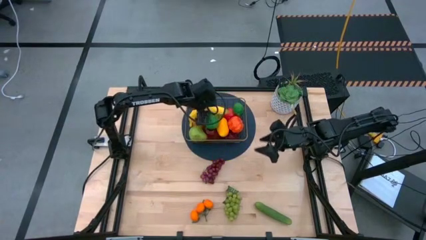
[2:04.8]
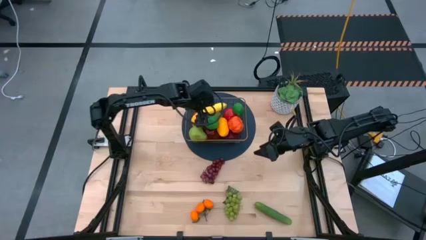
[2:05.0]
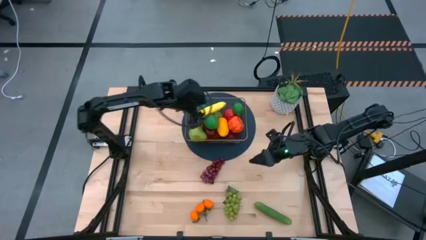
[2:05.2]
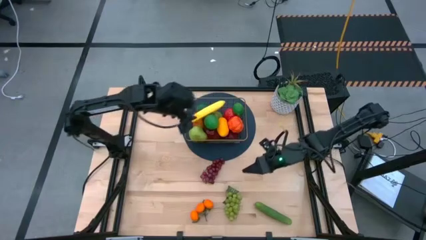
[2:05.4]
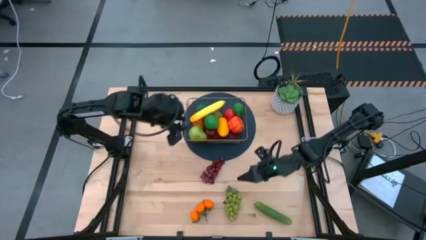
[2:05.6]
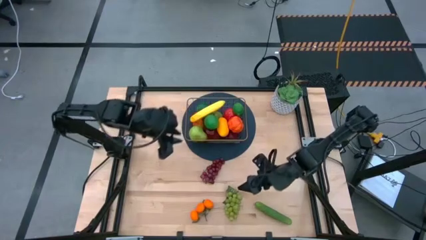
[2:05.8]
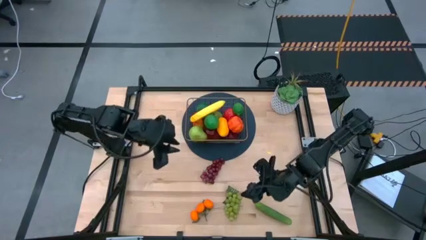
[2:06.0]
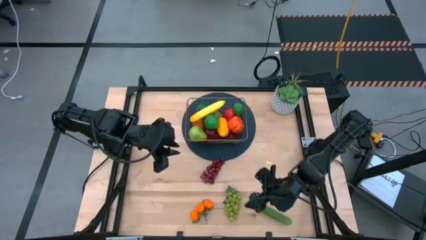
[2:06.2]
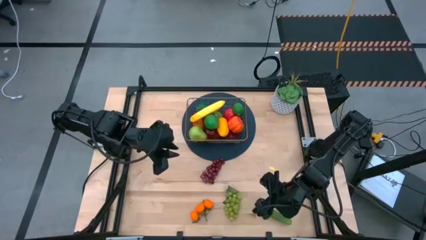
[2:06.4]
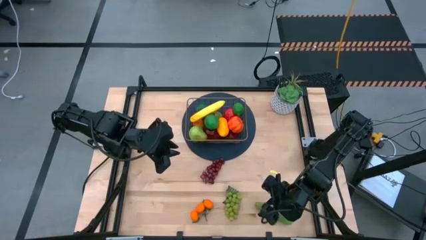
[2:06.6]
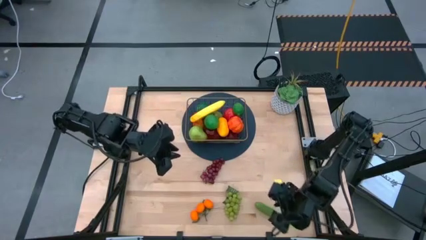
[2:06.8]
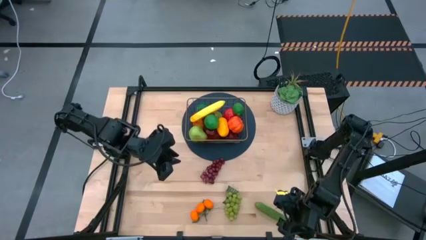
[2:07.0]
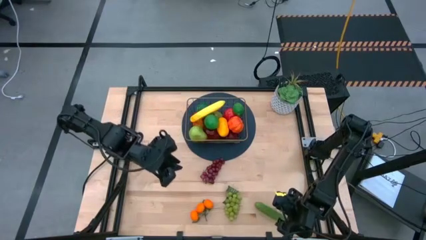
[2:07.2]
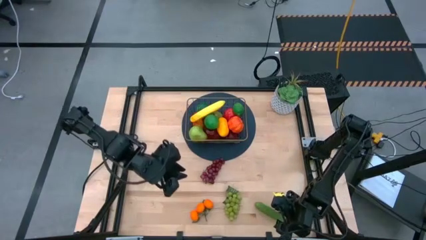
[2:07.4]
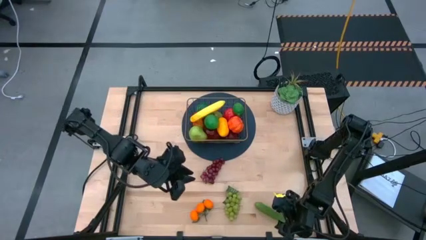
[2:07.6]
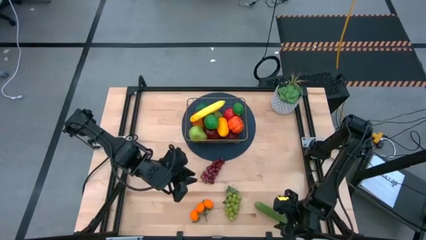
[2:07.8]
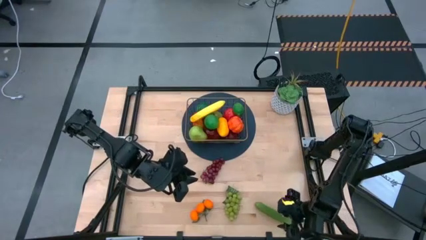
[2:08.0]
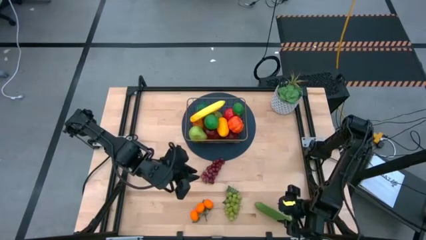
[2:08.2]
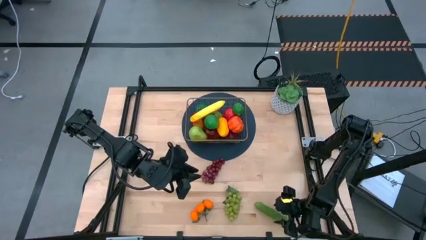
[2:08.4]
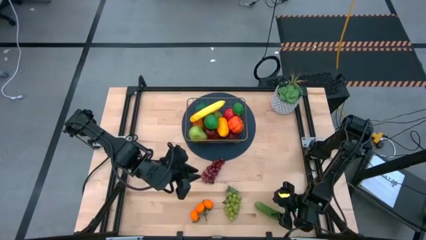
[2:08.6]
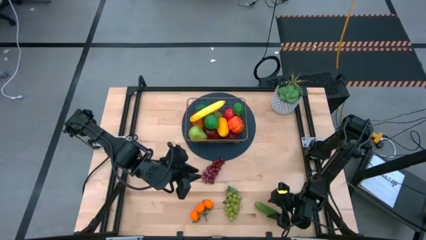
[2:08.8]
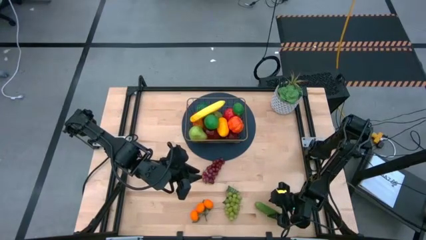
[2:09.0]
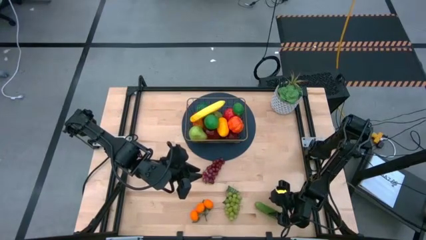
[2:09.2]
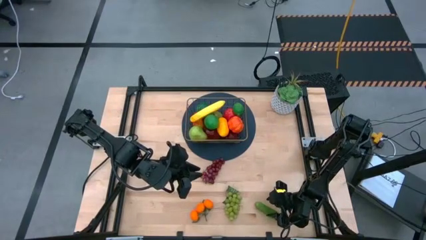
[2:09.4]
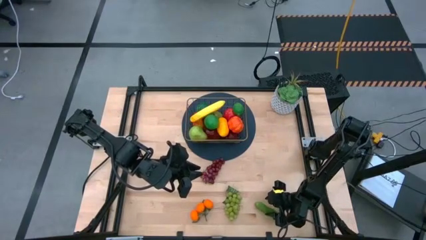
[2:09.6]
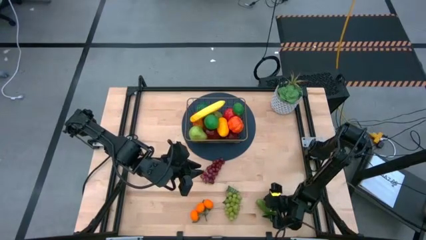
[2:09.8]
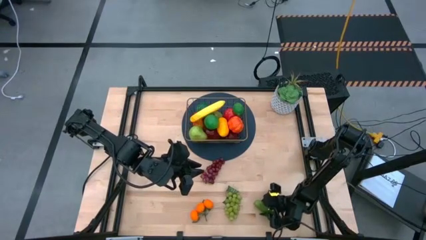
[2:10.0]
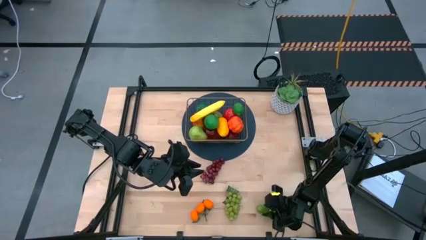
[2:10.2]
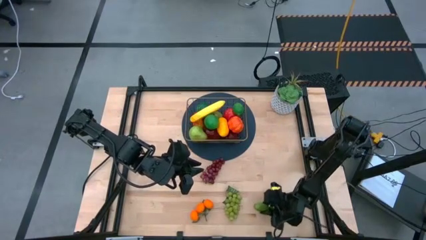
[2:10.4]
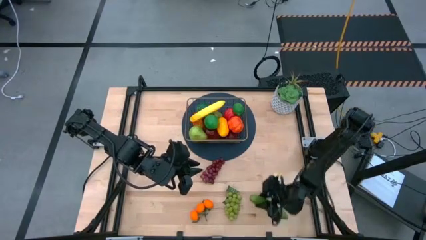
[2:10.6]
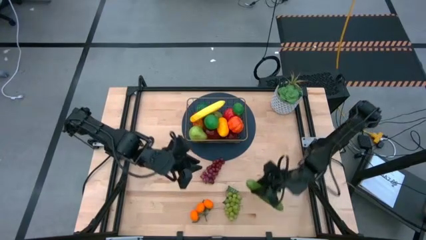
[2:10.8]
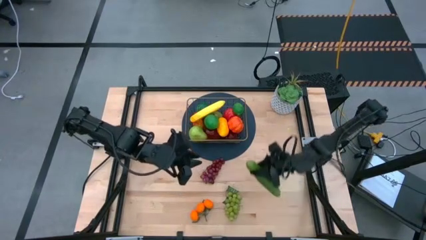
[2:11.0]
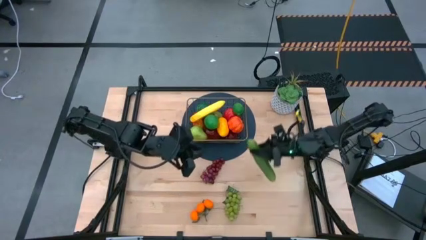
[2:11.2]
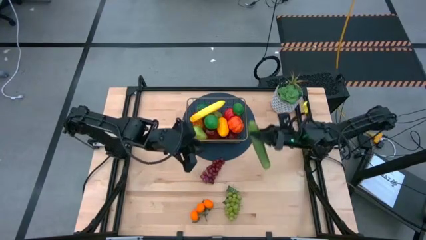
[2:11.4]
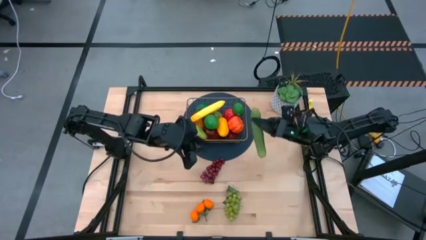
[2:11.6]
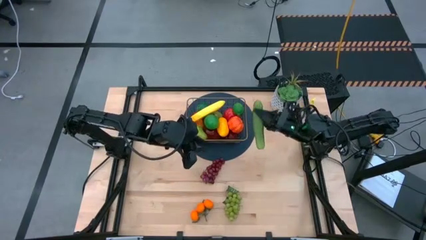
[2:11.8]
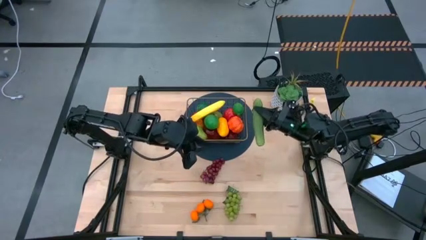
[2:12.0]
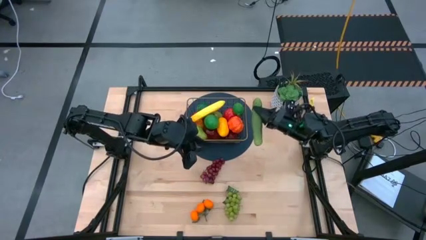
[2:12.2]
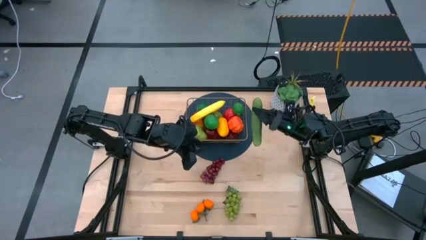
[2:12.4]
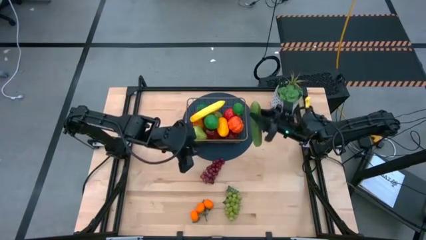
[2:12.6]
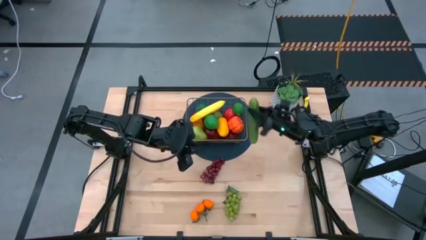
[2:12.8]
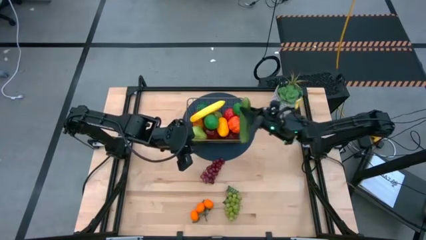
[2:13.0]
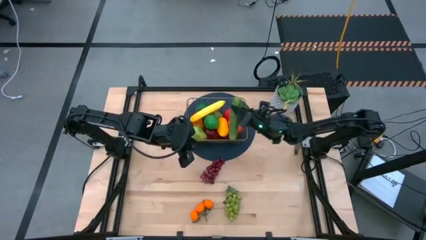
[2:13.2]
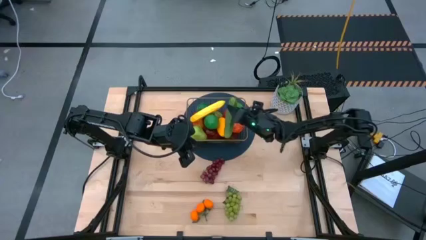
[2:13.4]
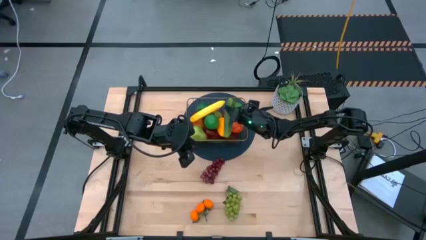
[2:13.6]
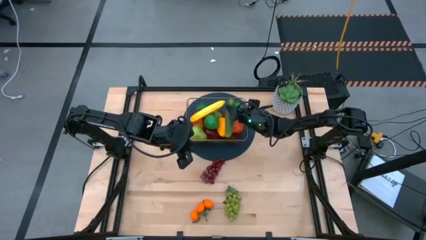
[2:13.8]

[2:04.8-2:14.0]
Task: Build produce basket
Put the green cucumber into the wire basket

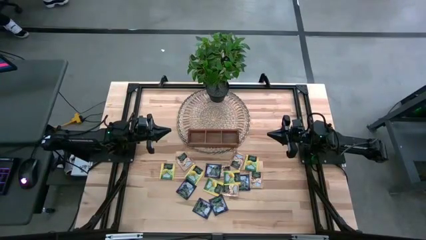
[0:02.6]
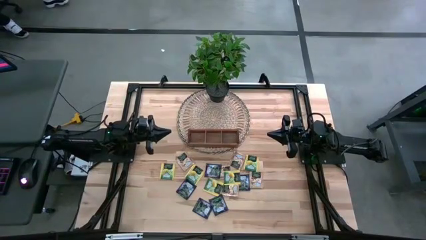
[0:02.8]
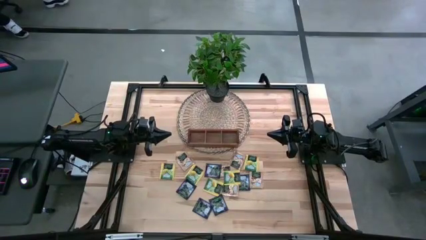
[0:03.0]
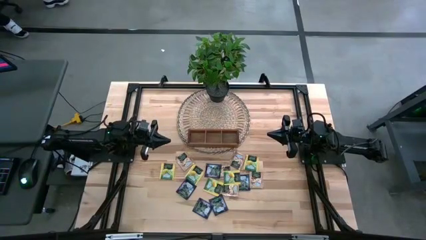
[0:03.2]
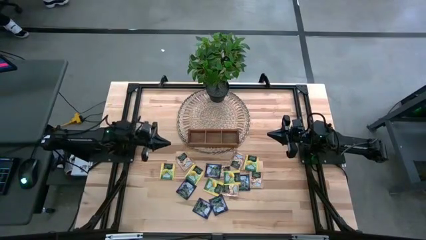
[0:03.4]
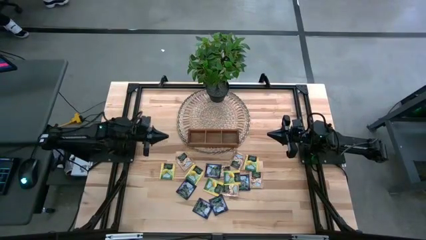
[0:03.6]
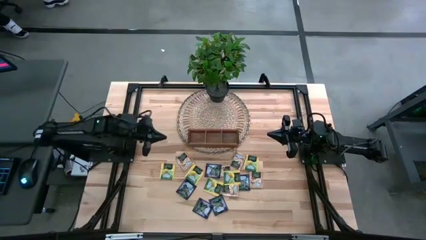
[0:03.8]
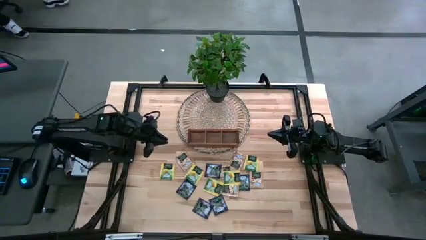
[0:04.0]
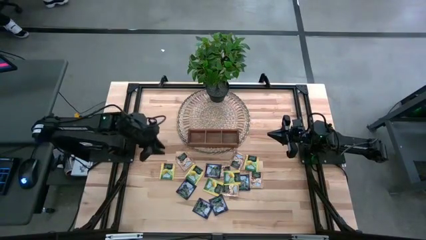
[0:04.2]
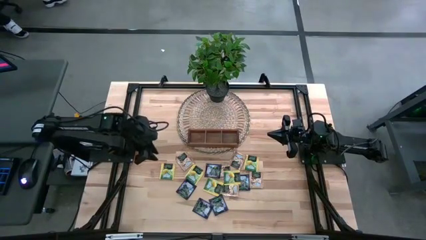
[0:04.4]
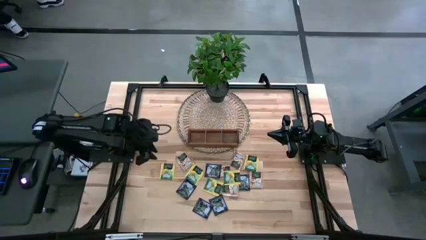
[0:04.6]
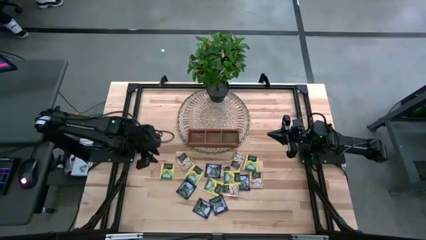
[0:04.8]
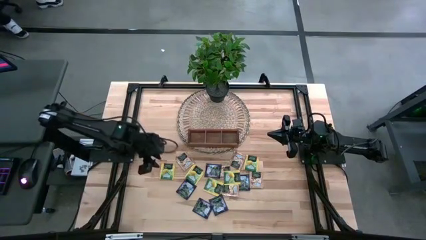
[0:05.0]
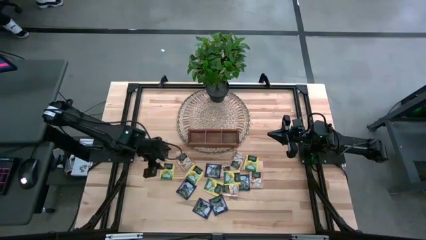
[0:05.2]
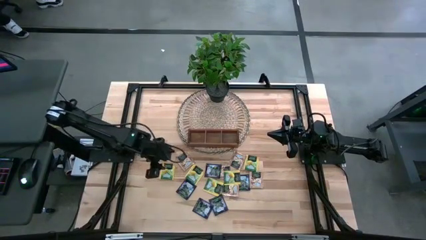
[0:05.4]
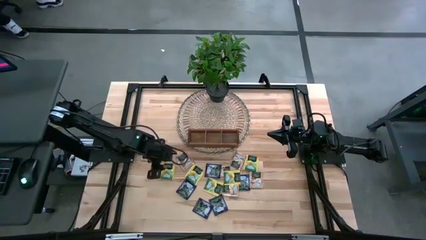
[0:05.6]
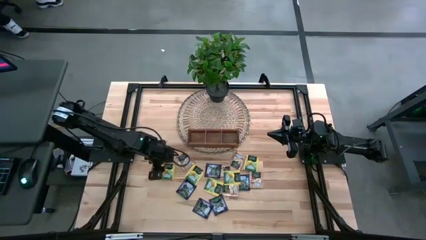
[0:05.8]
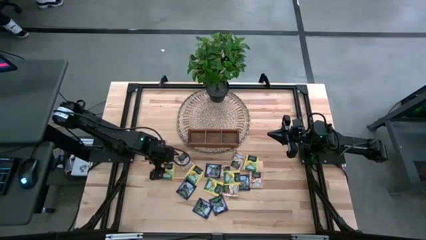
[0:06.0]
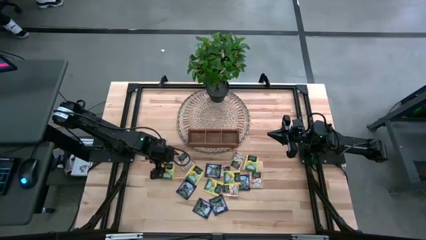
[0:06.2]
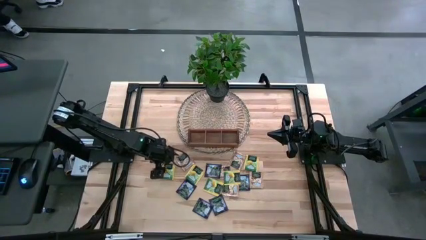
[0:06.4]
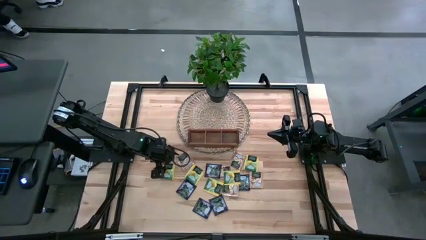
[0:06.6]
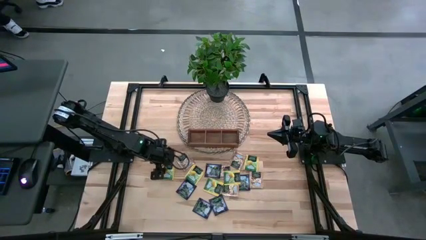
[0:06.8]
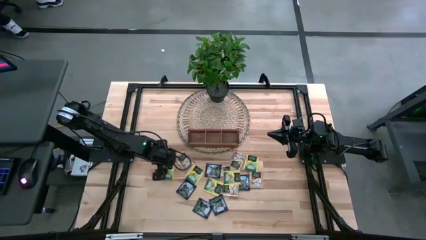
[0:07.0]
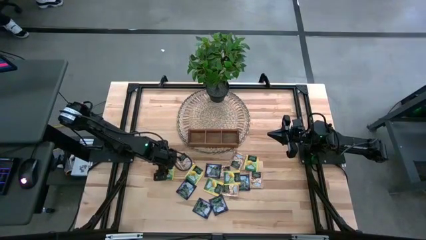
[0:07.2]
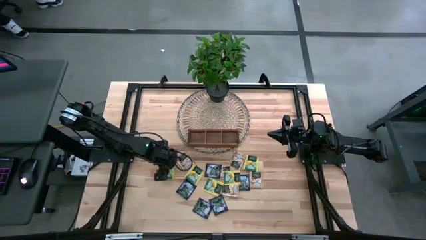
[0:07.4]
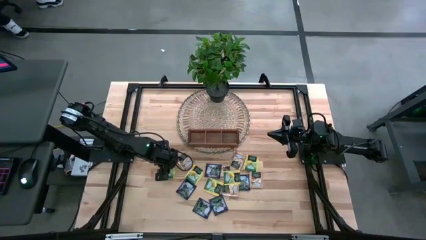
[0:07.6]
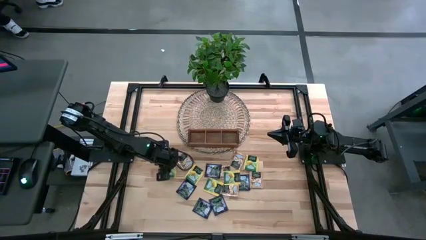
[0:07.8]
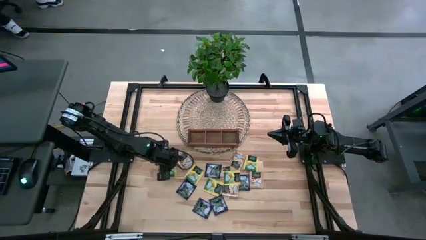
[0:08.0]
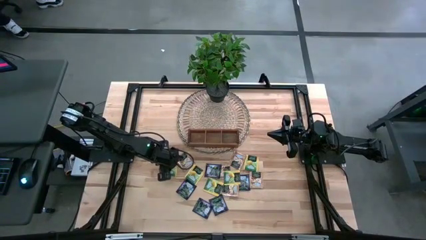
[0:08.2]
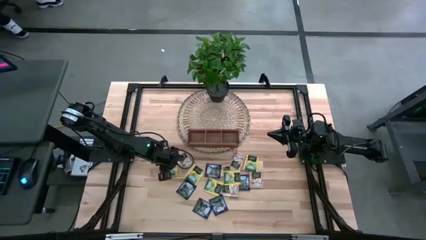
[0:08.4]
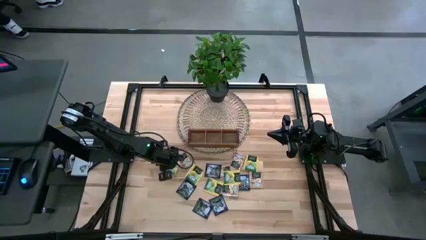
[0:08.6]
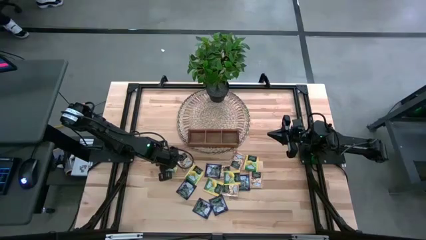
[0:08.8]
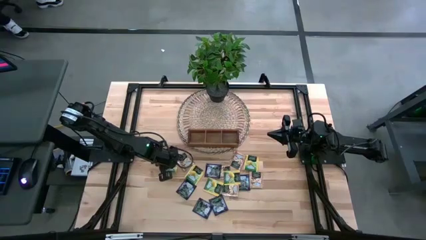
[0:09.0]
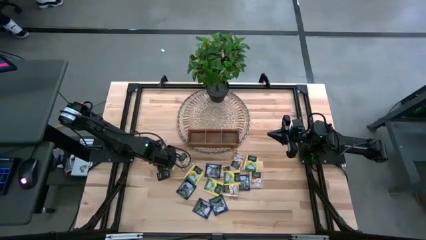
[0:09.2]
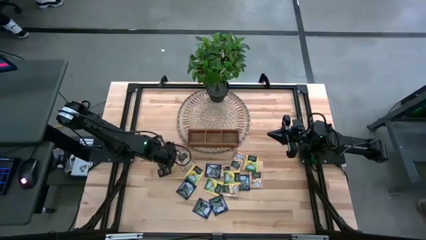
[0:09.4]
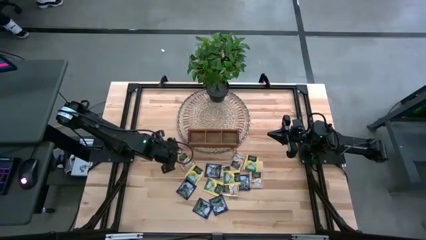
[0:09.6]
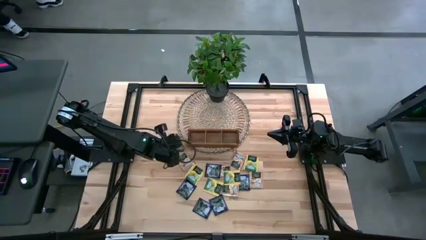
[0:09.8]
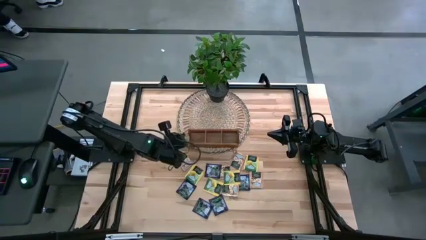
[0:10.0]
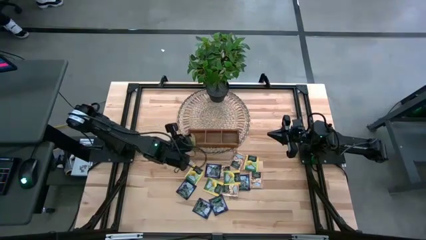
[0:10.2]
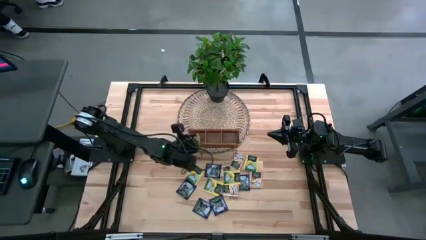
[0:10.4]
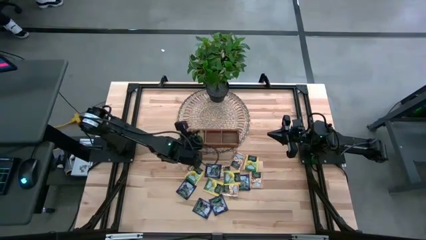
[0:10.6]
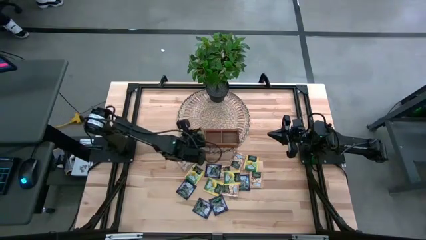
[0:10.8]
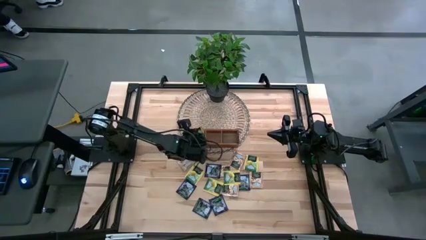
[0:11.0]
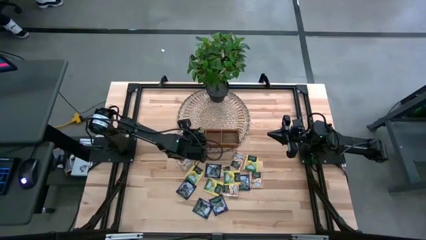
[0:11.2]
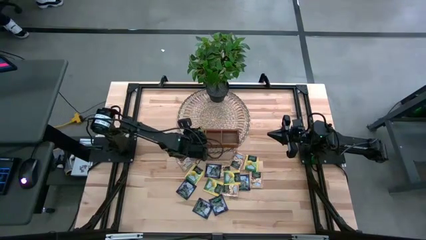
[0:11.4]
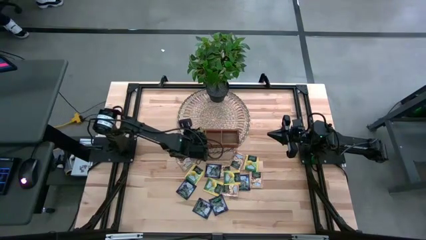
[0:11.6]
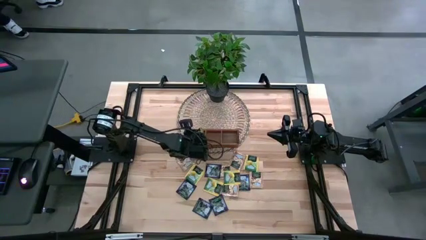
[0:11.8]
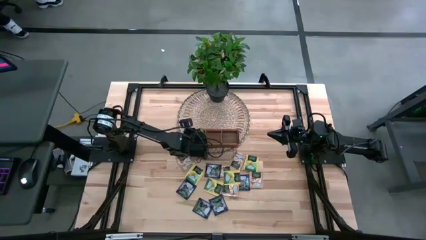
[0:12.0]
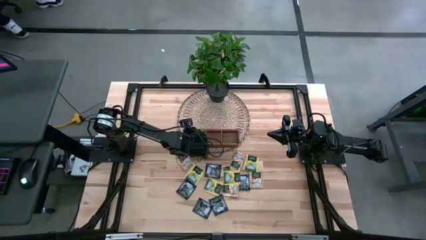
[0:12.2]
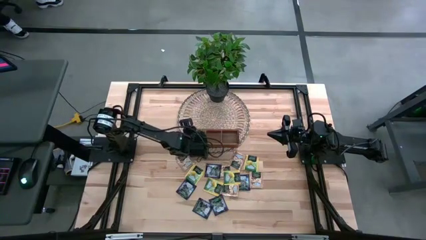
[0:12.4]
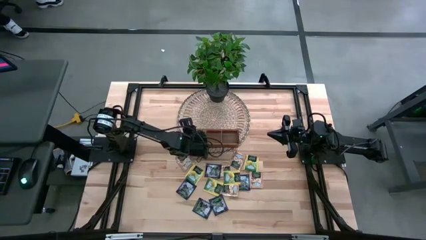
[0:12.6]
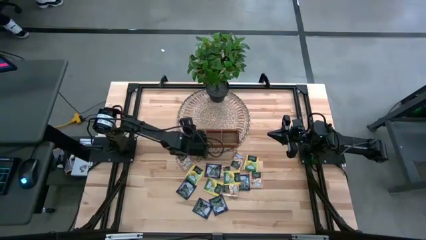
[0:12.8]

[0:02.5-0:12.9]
Task: Pick & Place Tea
Put the green tea bag into the left section of the wooden organizer
